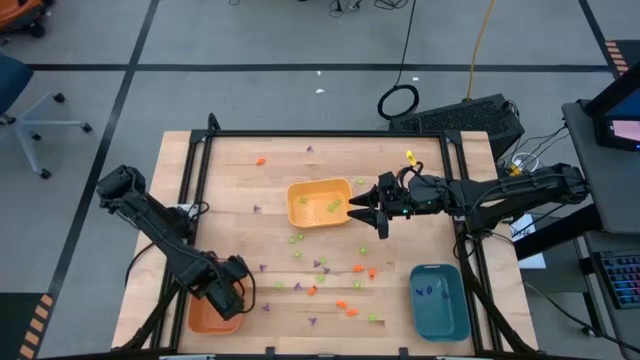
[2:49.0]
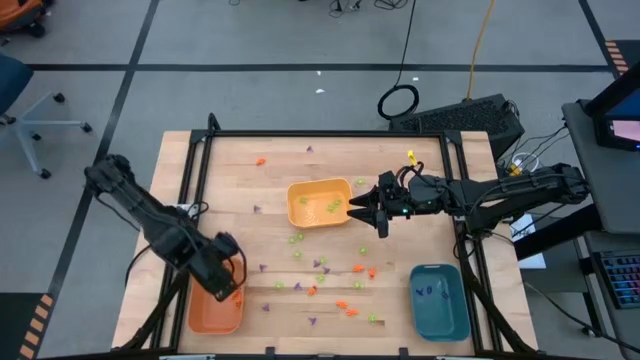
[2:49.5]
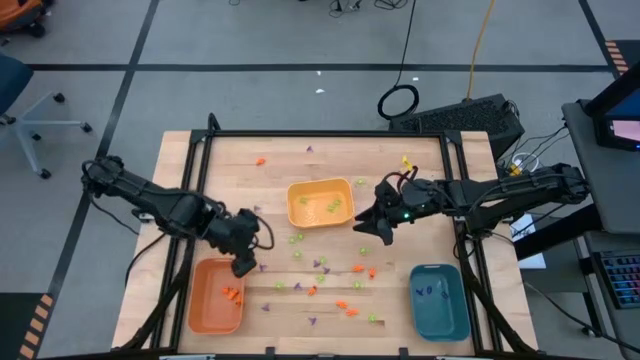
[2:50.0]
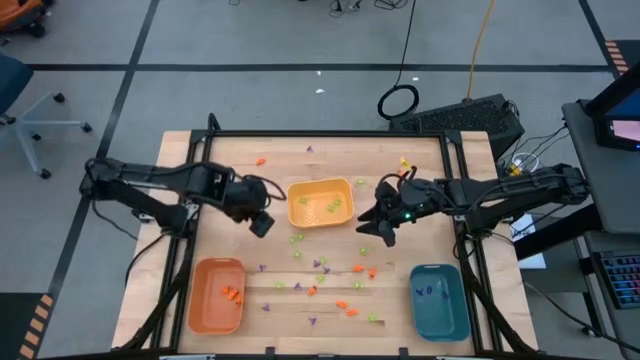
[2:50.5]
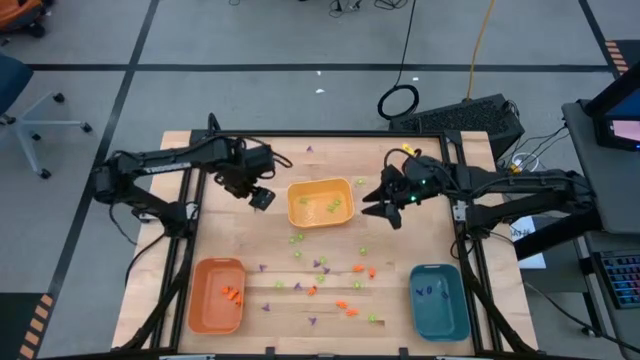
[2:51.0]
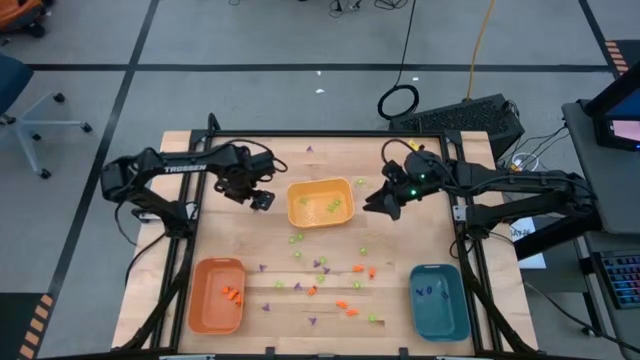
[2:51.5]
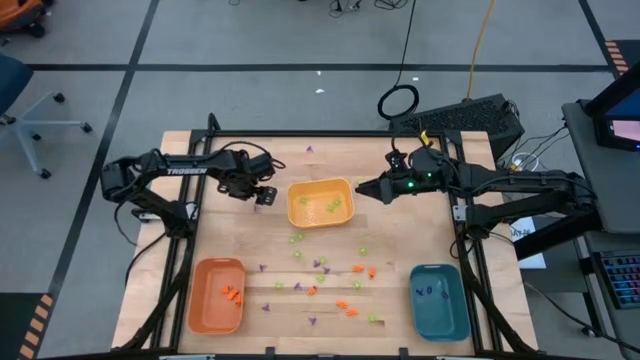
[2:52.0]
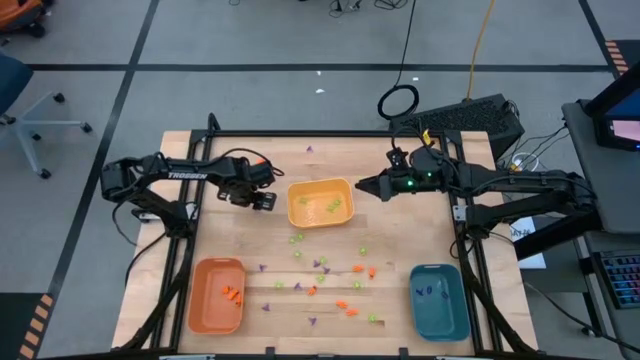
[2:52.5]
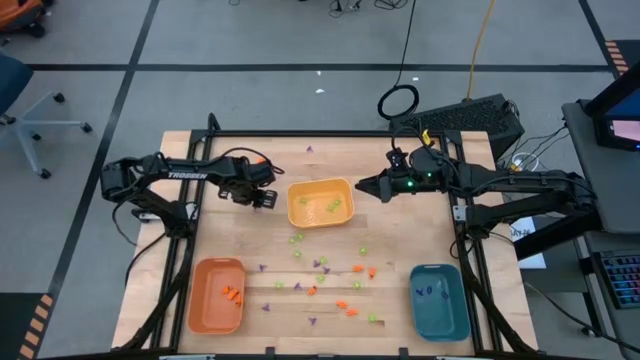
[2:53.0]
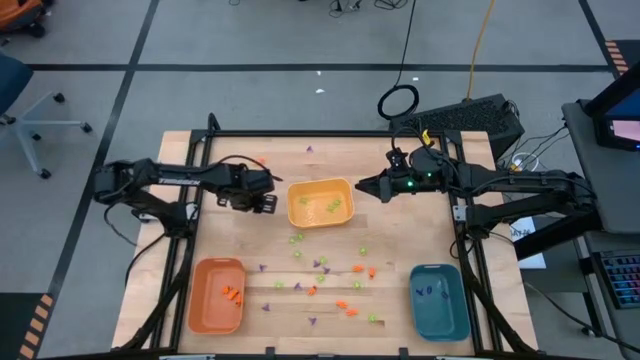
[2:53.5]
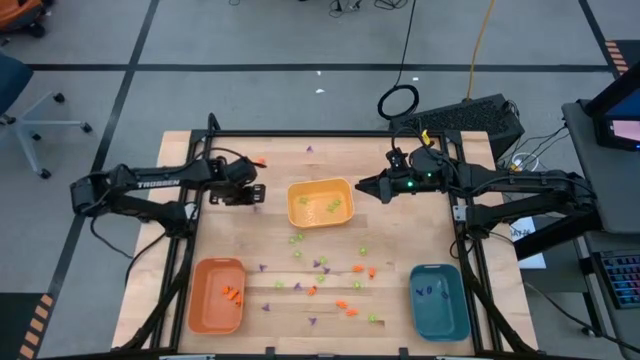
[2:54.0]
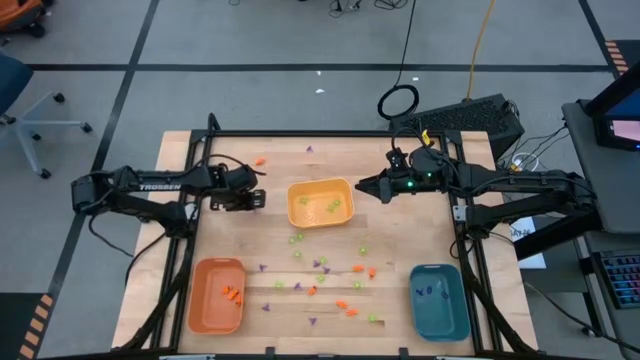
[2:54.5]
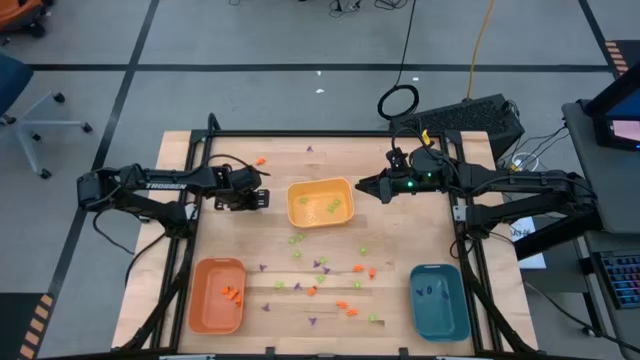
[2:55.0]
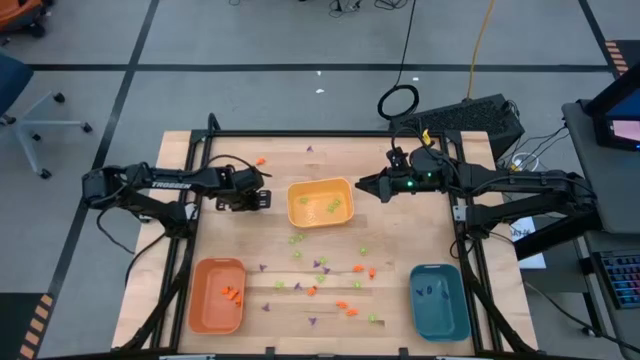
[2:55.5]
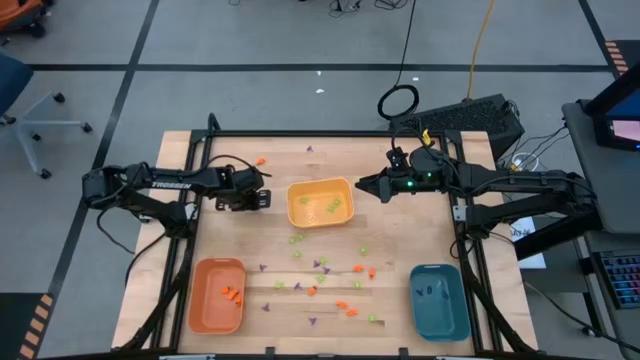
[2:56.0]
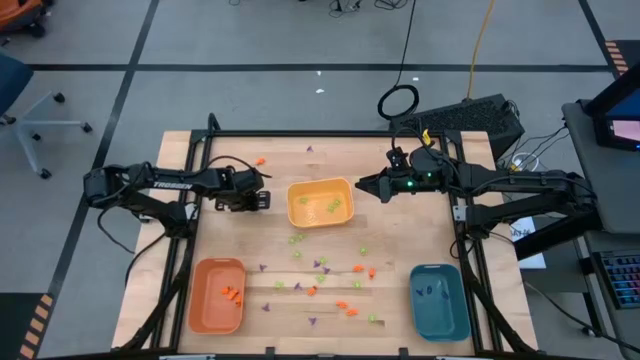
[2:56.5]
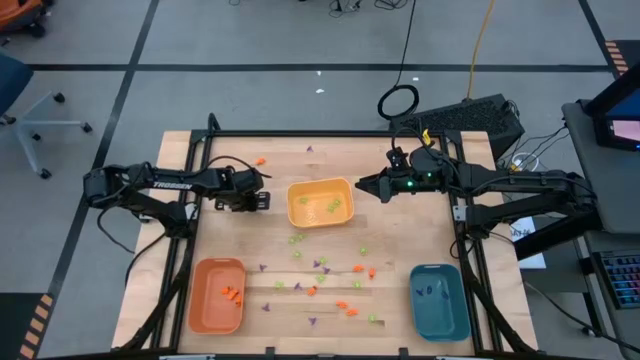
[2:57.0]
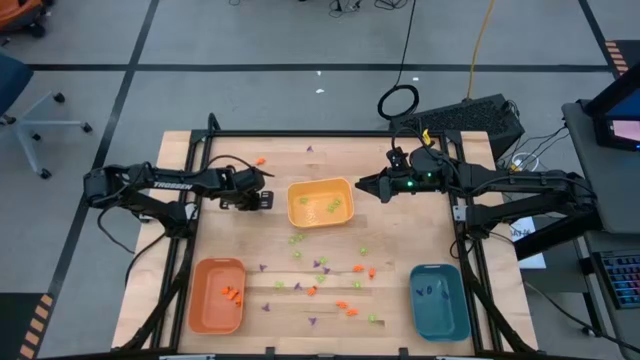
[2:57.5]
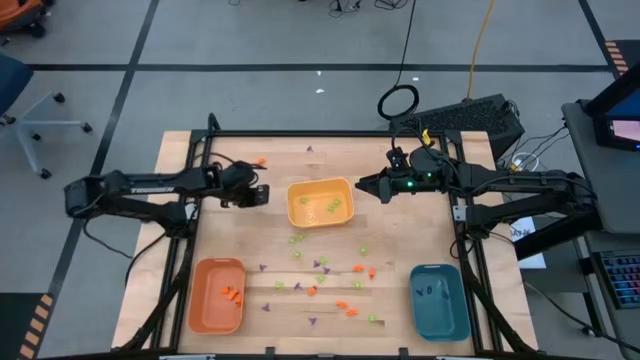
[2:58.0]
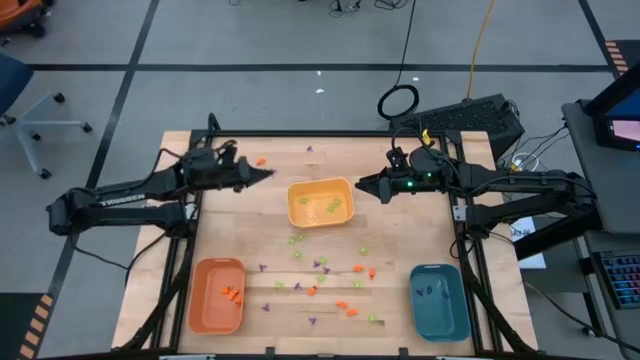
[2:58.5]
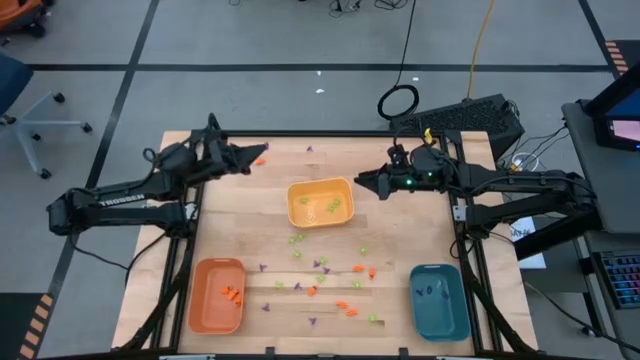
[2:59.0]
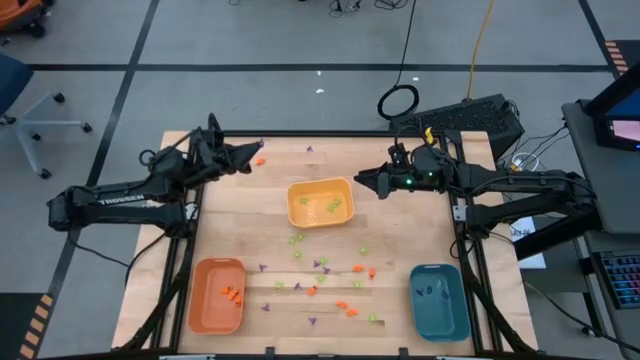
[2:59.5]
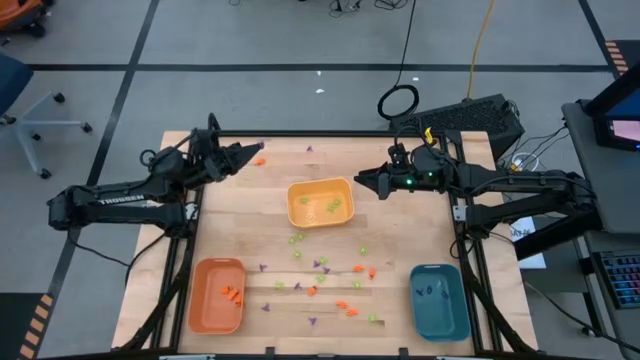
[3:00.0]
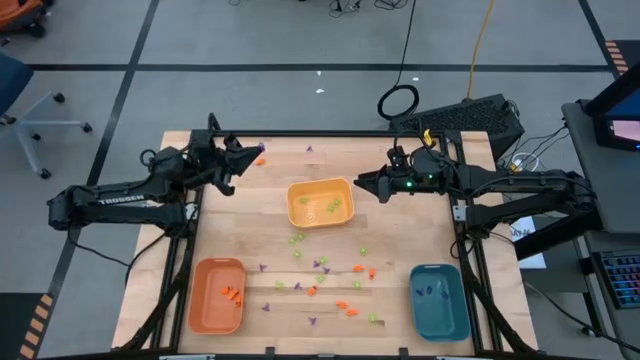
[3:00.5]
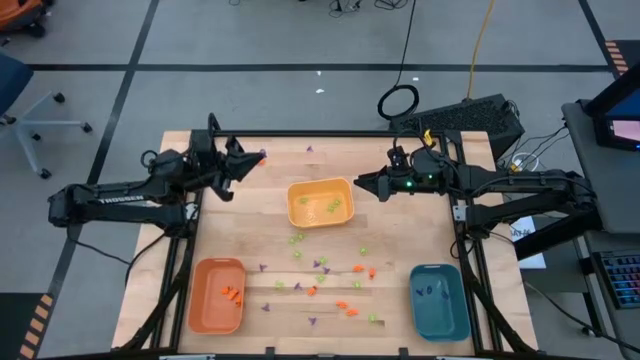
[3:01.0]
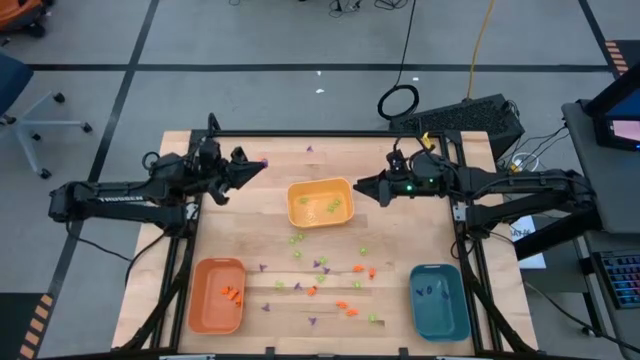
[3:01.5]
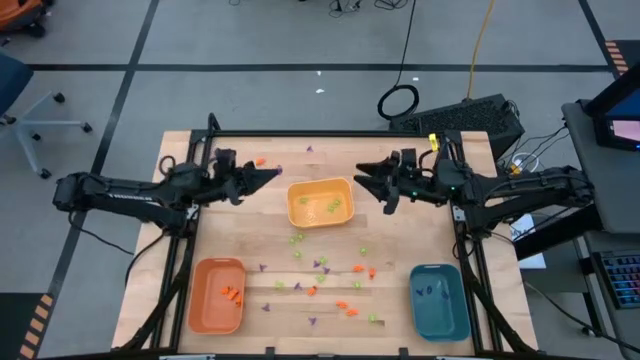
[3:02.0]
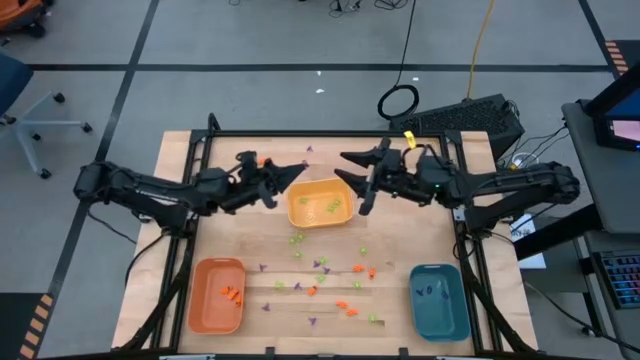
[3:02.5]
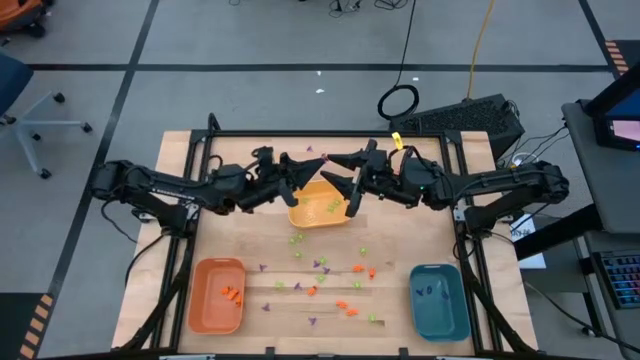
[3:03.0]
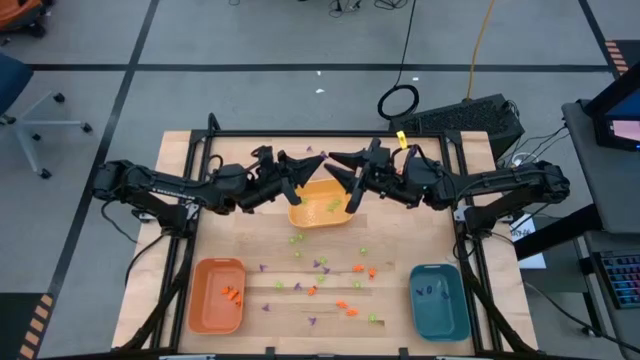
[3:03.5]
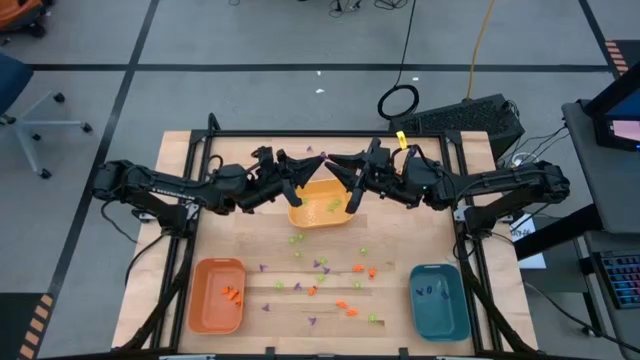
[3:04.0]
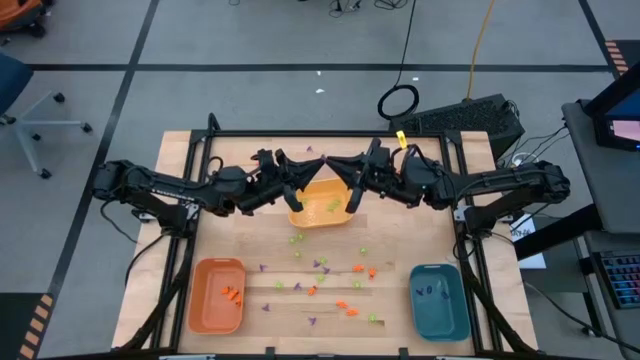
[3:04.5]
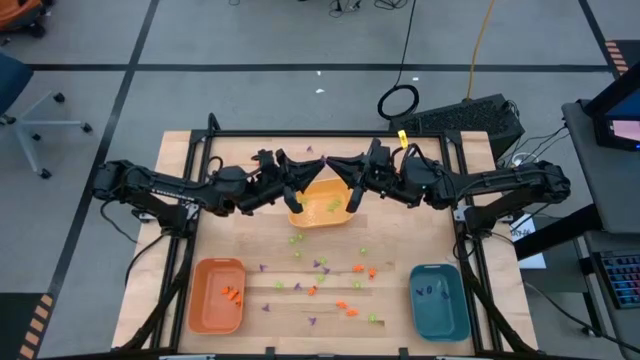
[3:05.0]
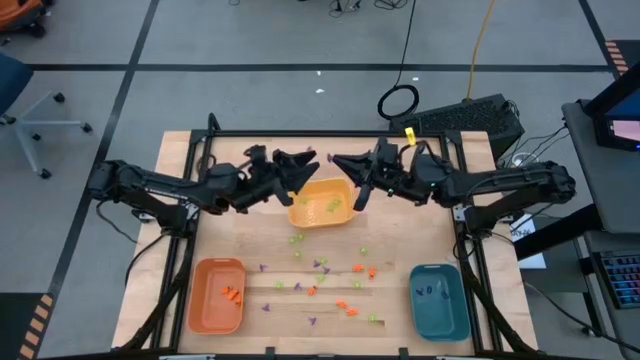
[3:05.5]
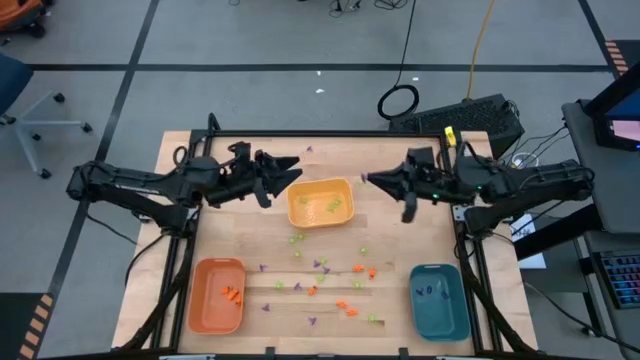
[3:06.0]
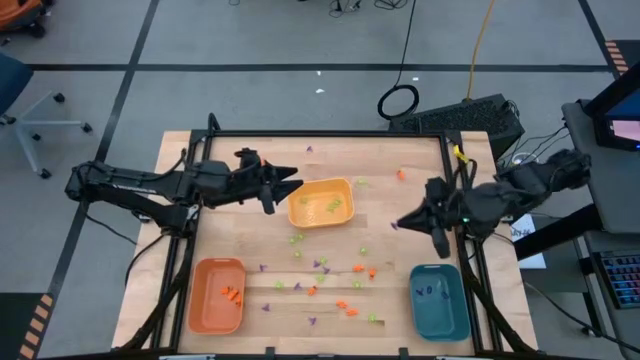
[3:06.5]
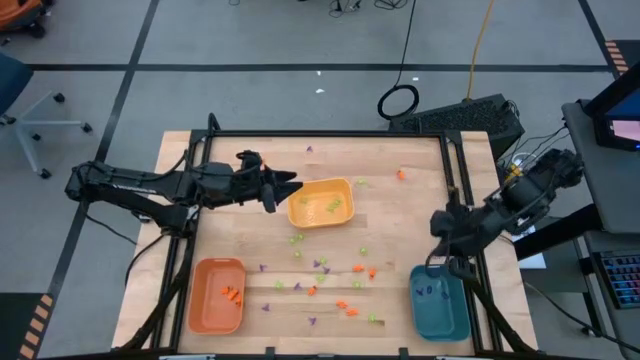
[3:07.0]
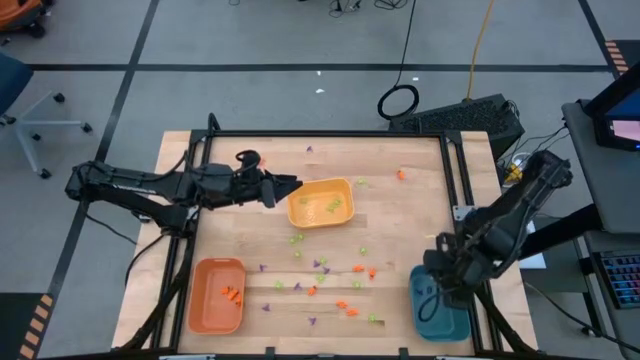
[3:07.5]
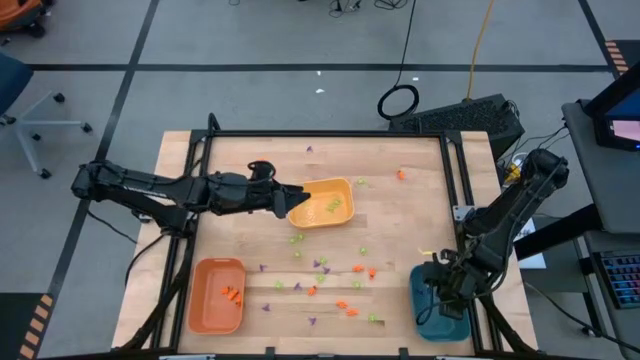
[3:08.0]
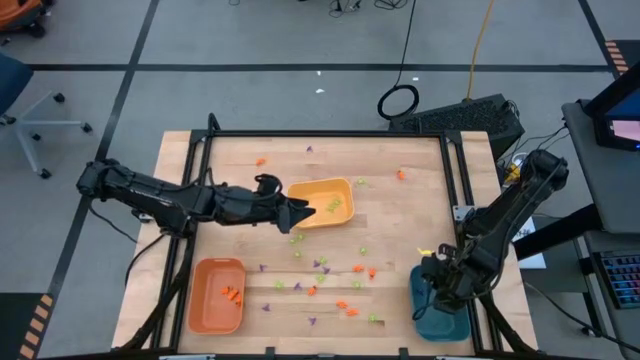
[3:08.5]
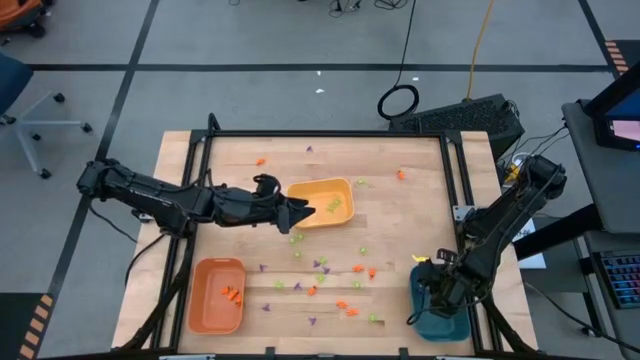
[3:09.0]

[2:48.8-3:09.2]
Task: Sort Halloween decoration
Put the violet witch hat toy into the blue bin
